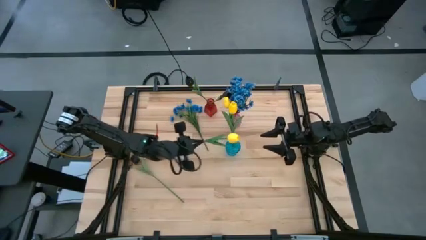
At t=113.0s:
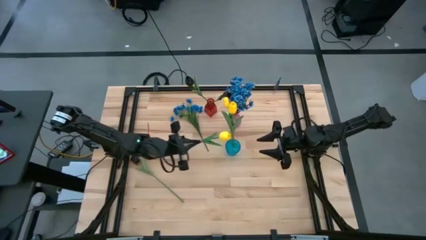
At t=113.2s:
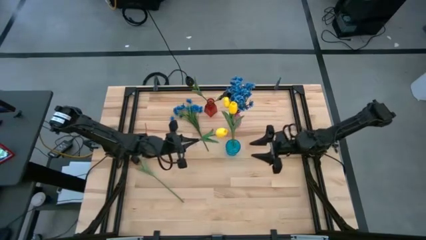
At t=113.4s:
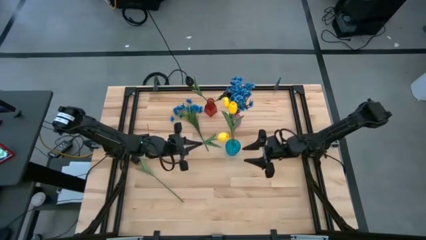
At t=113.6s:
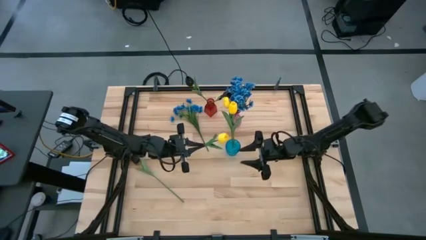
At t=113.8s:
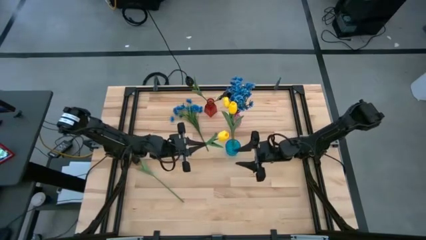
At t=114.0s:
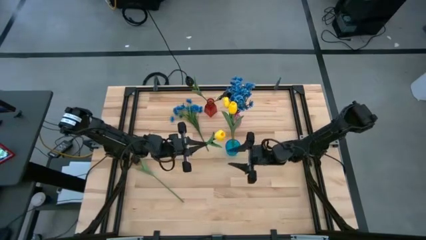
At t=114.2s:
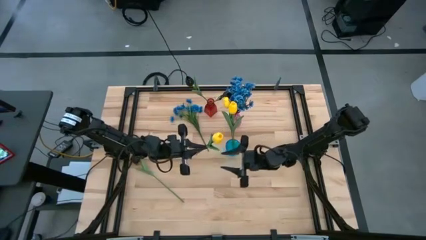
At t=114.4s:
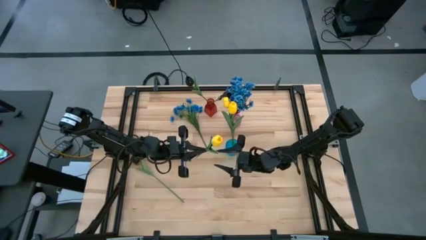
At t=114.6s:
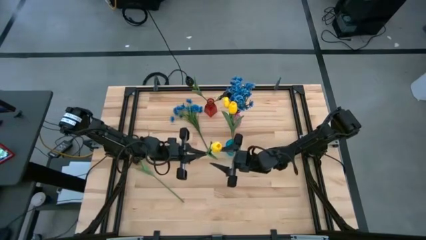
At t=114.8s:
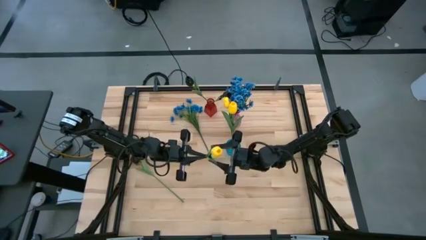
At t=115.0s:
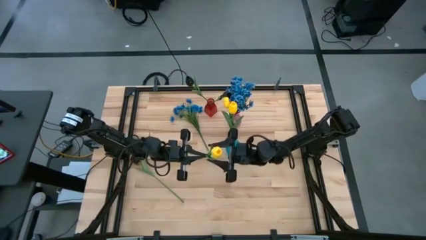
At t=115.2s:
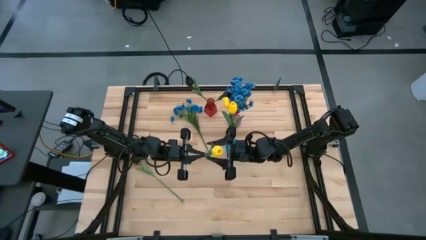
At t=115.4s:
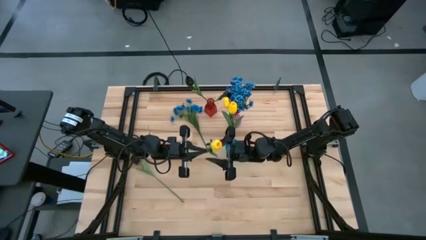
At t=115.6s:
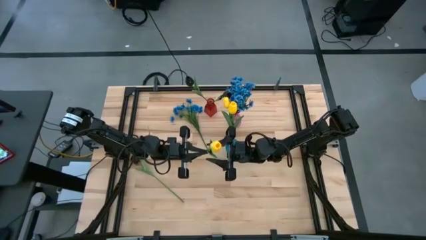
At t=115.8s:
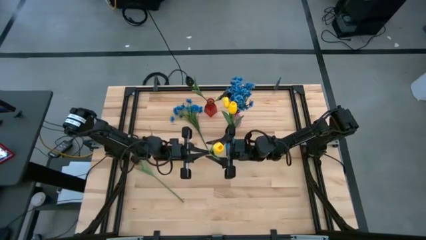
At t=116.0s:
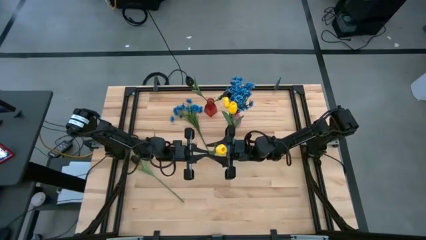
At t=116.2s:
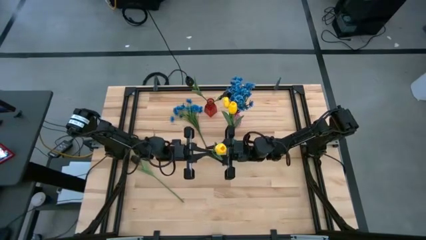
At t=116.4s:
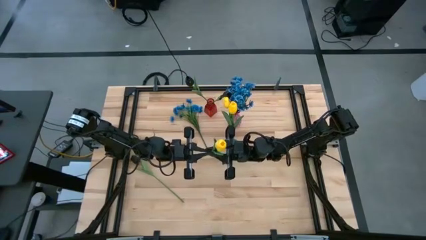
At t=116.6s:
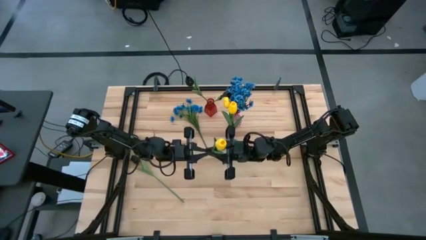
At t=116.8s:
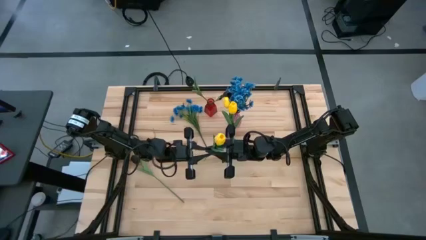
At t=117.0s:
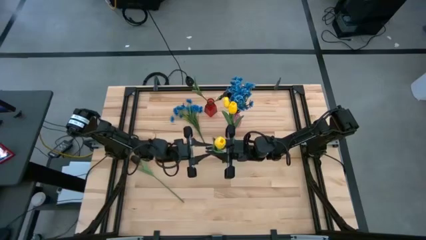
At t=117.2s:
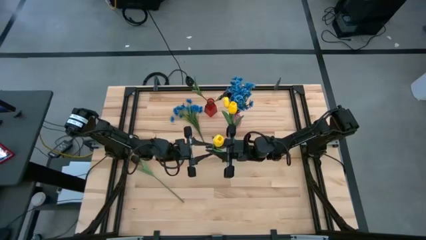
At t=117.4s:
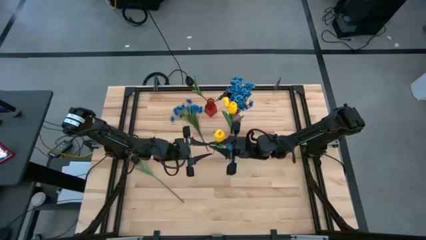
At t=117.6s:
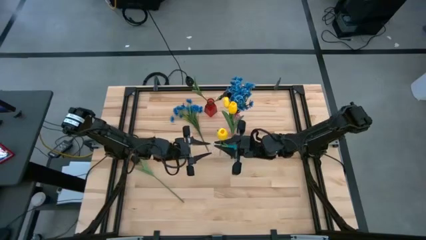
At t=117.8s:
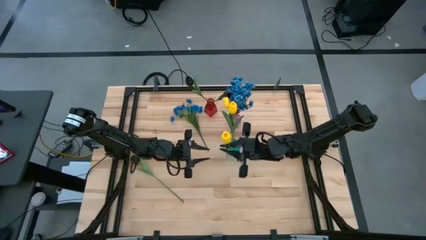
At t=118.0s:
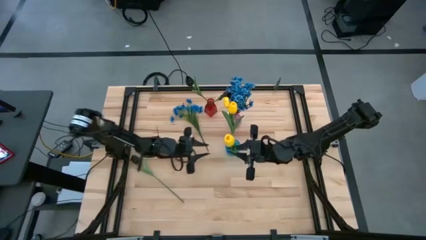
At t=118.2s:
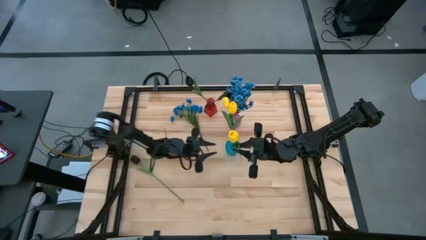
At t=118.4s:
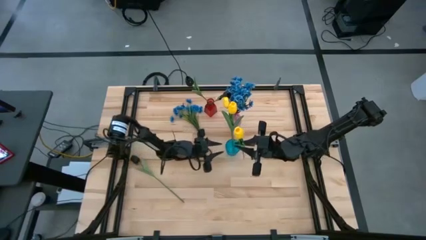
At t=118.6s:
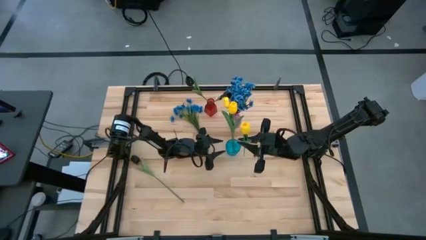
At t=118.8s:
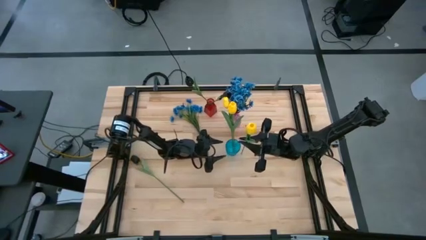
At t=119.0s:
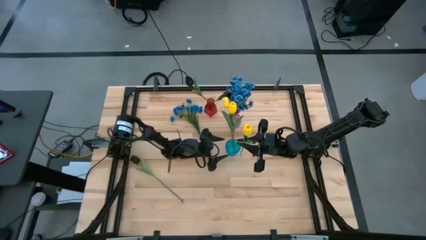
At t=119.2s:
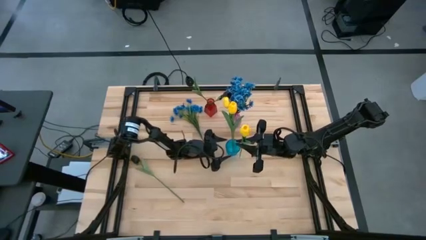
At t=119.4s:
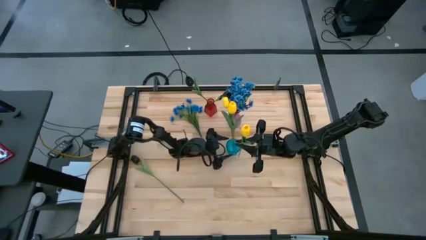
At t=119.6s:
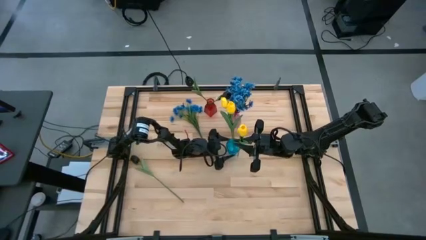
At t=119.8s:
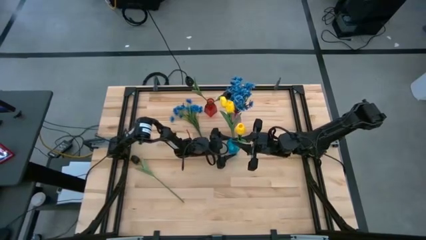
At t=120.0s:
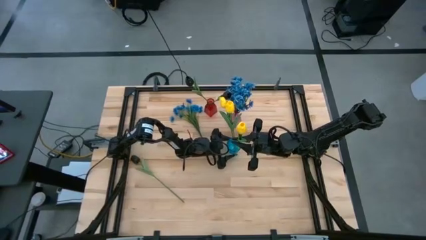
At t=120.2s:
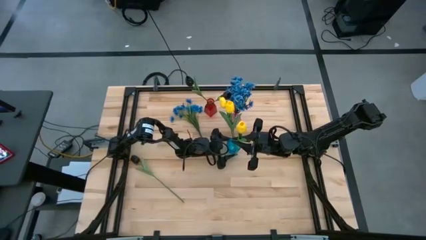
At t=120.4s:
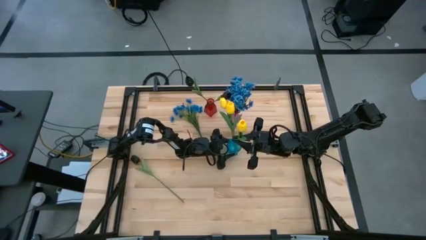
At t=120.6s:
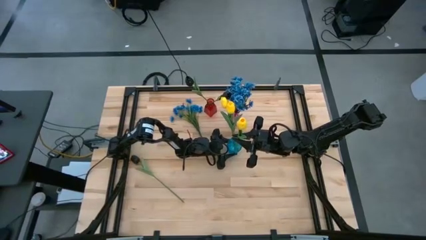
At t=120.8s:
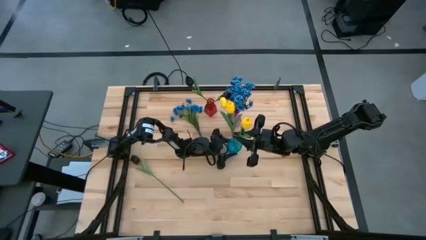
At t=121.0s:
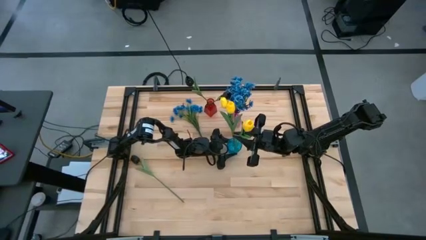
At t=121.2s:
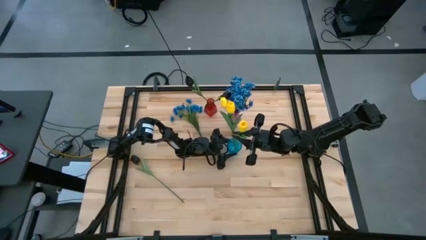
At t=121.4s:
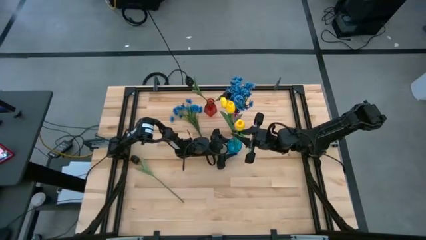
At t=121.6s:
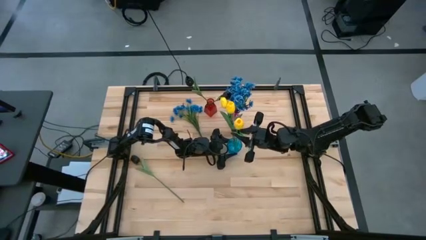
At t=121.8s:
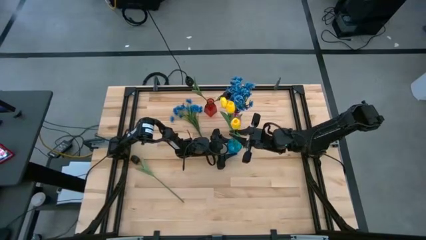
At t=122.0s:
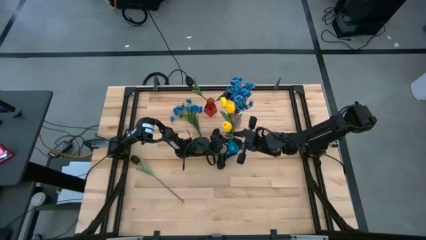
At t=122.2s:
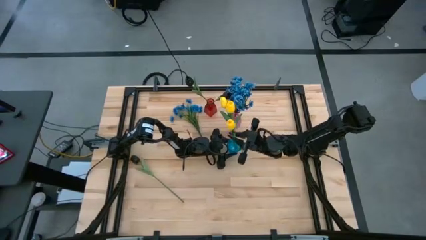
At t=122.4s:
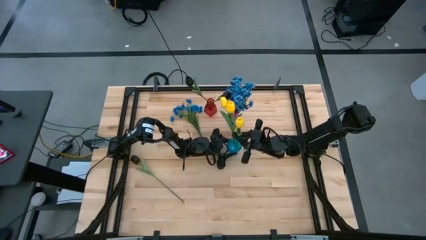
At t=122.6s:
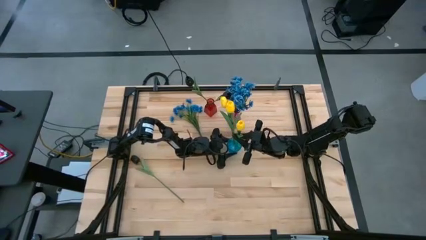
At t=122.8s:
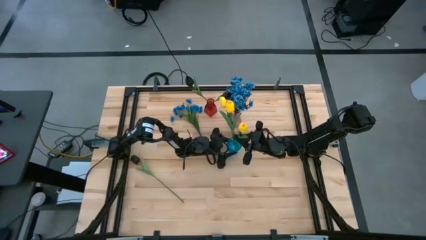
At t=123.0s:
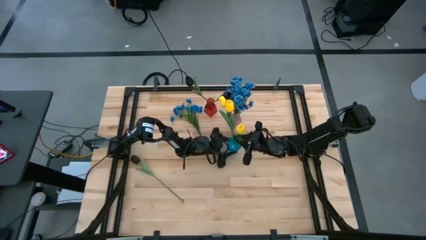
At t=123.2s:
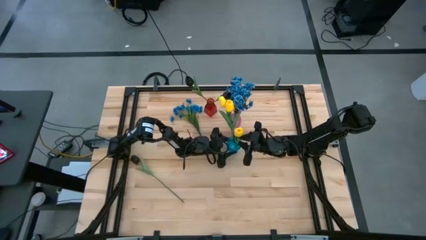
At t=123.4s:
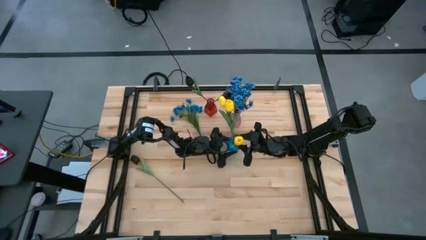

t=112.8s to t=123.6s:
Task: Sort flowers into vase by color
Put the yellow flower into the blue vase

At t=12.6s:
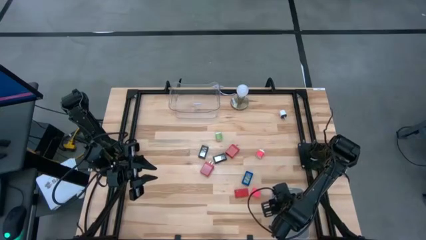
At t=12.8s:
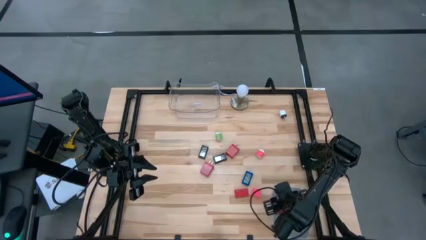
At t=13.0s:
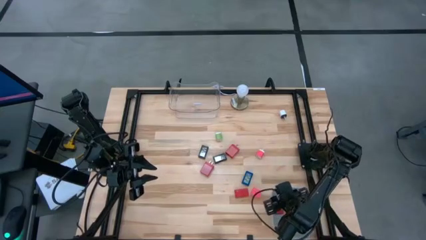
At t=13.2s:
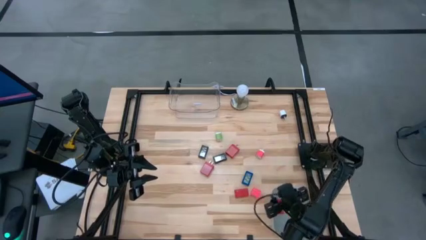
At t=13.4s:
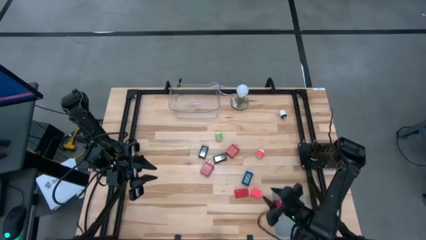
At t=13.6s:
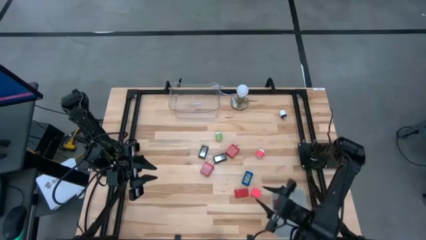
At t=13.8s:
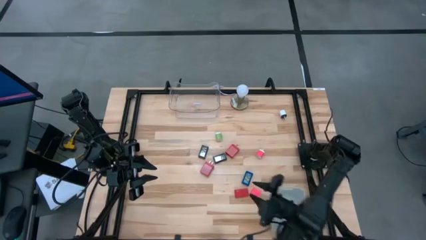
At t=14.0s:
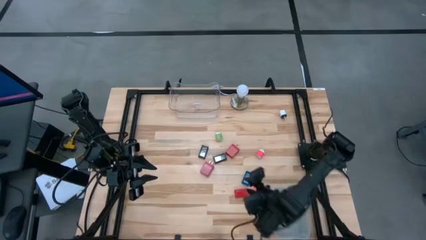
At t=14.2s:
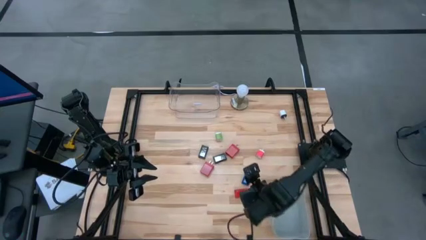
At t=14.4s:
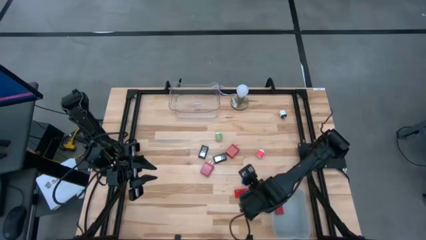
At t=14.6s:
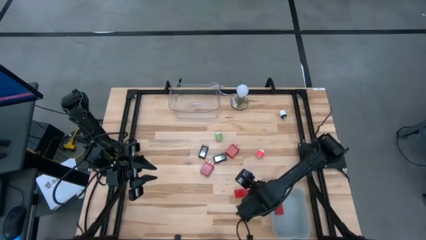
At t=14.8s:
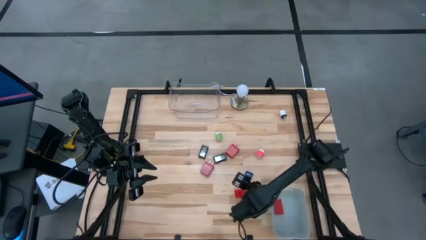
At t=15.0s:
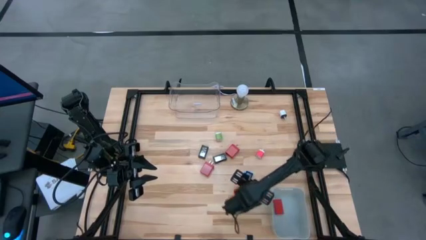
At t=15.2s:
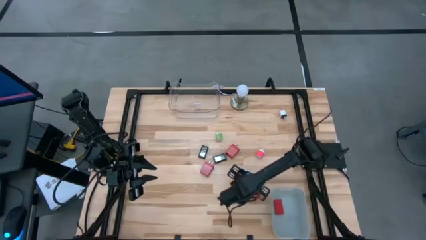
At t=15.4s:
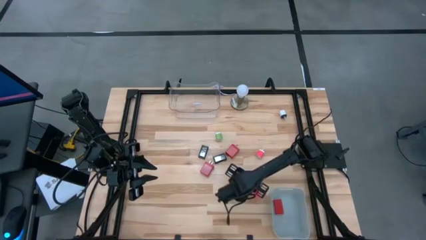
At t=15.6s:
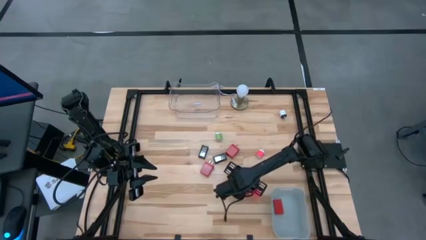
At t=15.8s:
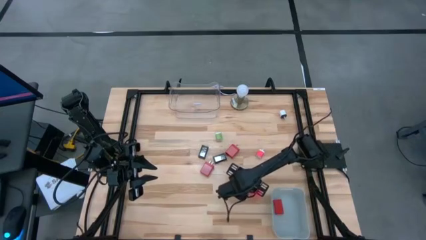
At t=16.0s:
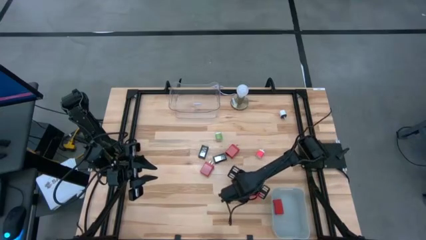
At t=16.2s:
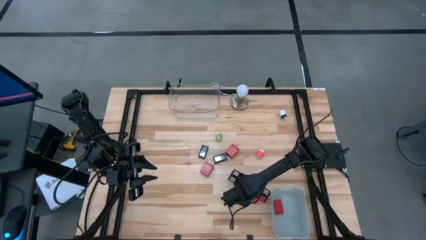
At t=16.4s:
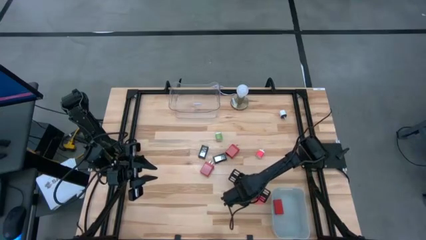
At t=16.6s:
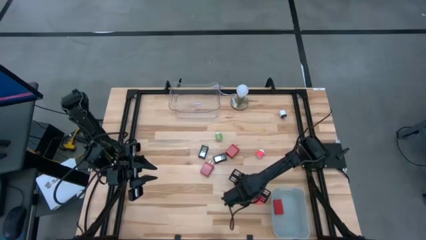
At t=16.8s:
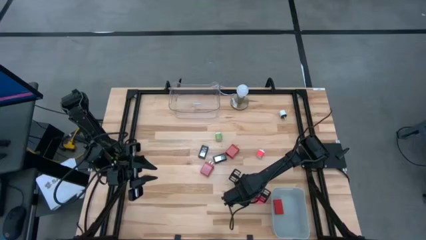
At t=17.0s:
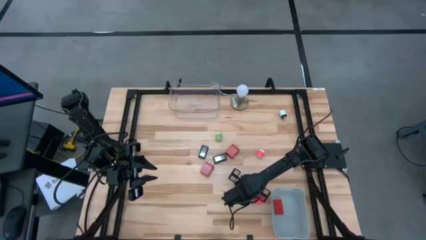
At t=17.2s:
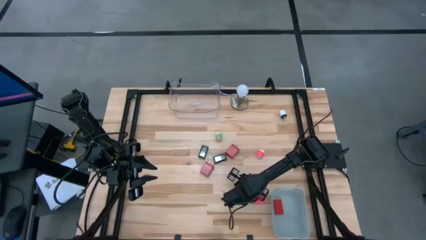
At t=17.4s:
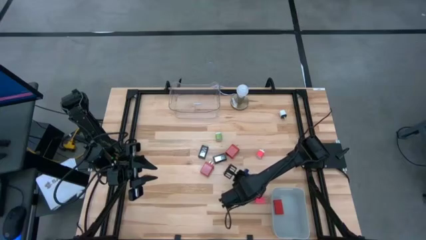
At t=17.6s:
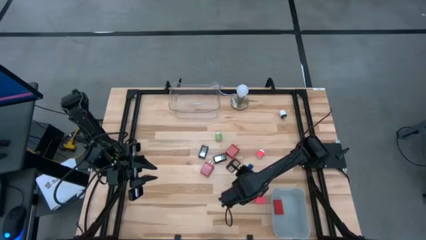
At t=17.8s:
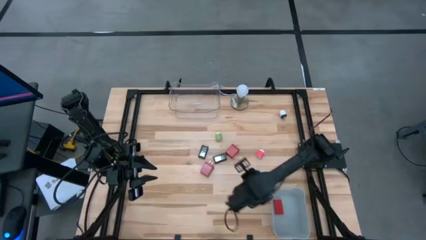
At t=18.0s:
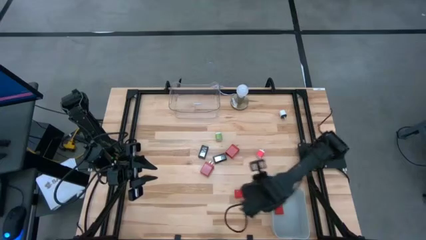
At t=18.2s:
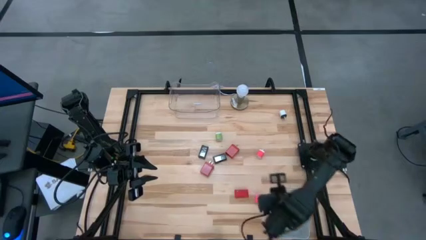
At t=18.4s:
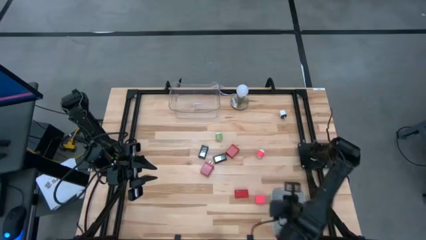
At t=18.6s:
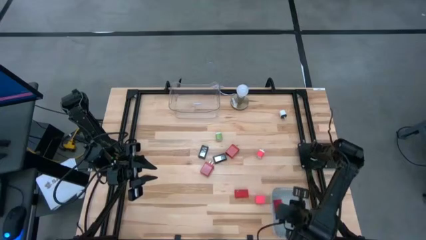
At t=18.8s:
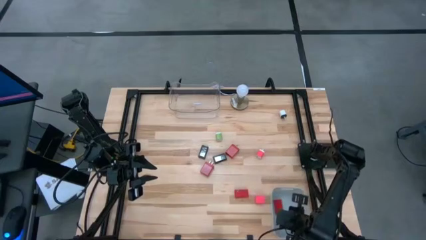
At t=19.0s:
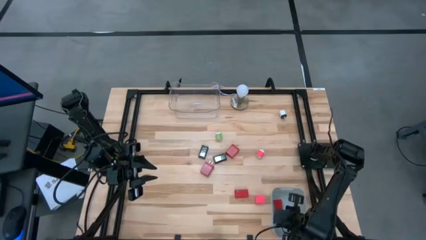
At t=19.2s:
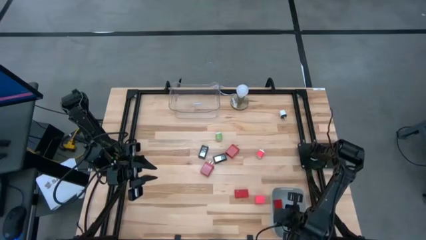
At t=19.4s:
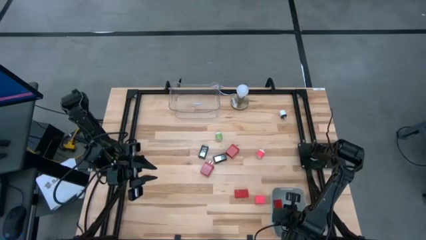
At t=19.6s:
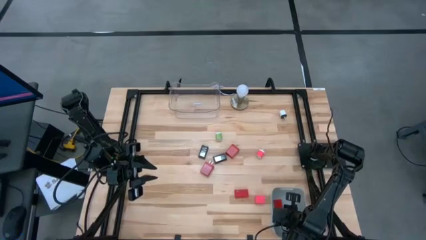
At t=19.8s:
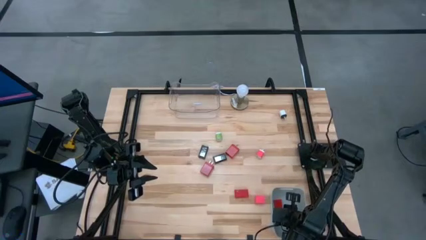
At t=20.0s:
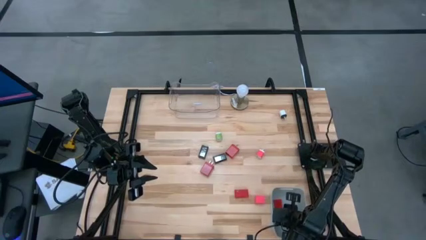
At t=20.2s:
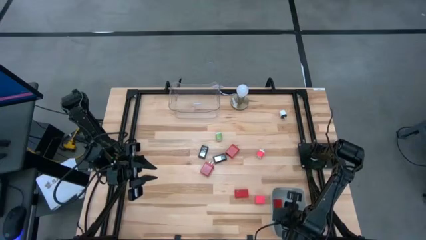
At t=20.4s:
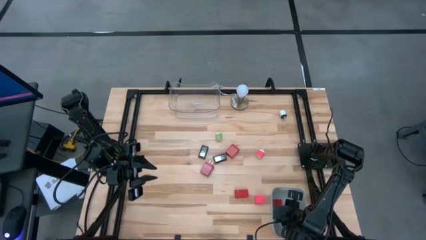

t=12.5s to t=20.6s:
Task: Pick & Place Office items
Put the blue digital clock into the gray bin
